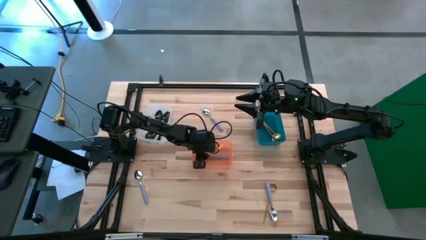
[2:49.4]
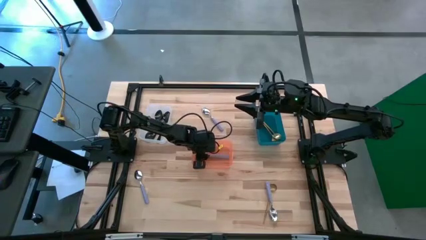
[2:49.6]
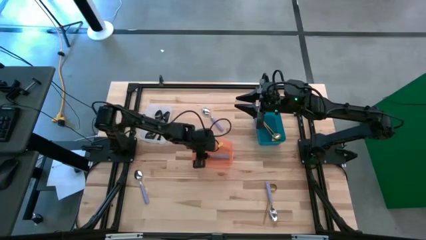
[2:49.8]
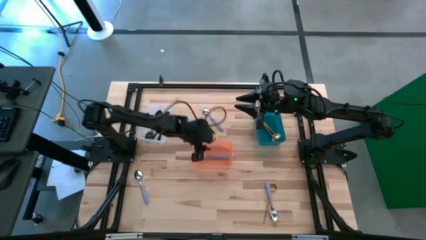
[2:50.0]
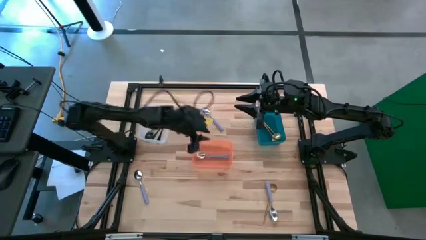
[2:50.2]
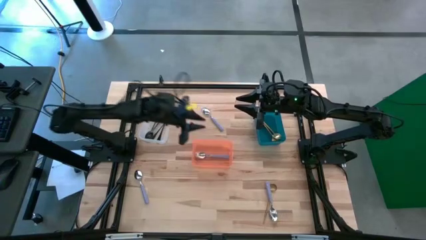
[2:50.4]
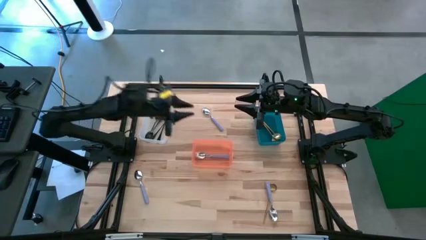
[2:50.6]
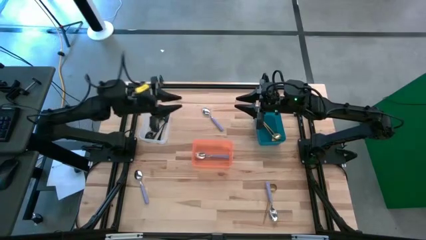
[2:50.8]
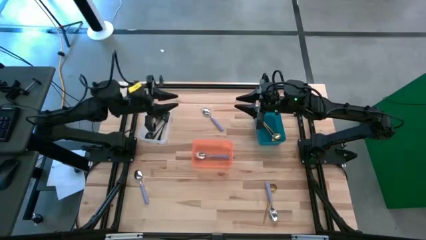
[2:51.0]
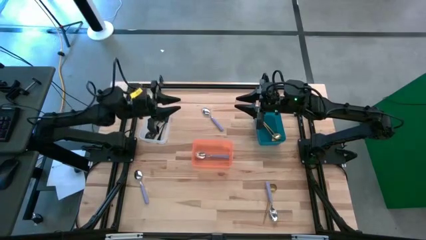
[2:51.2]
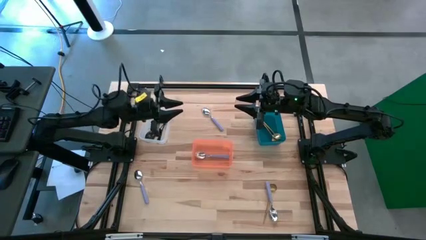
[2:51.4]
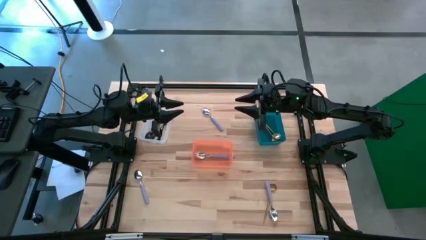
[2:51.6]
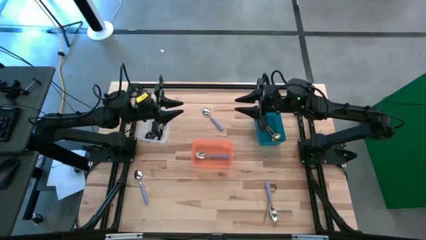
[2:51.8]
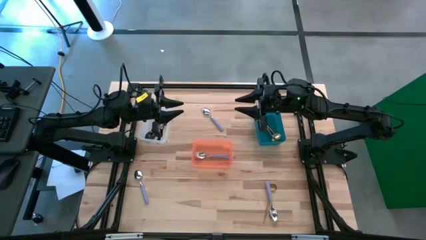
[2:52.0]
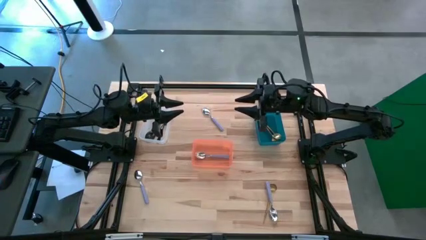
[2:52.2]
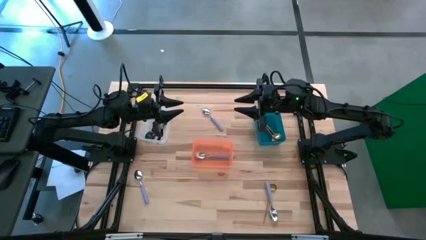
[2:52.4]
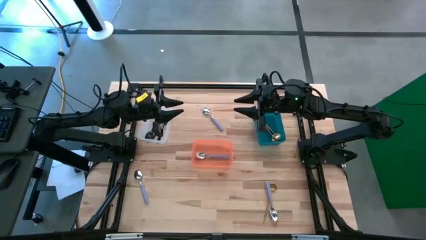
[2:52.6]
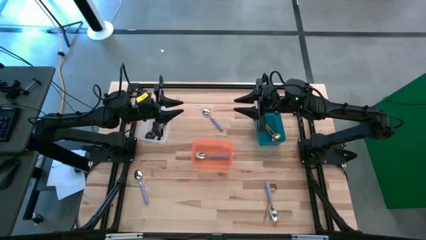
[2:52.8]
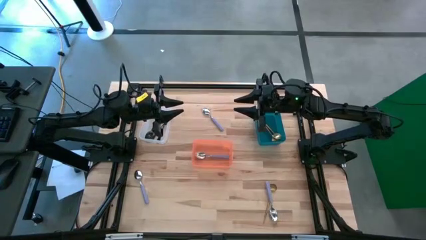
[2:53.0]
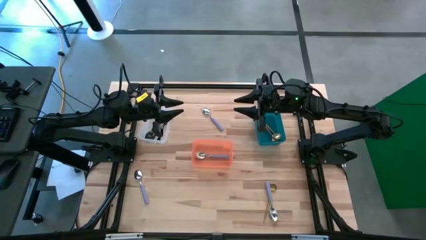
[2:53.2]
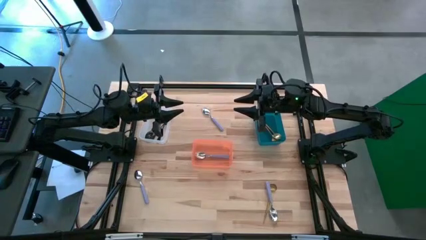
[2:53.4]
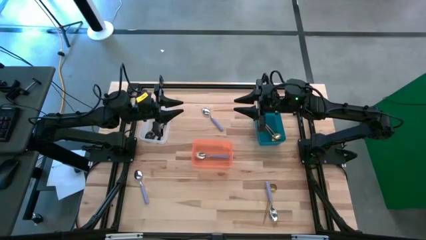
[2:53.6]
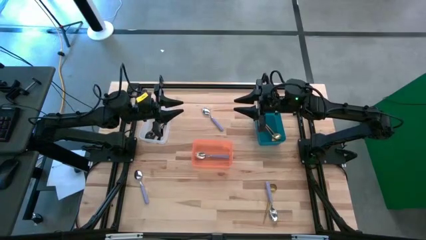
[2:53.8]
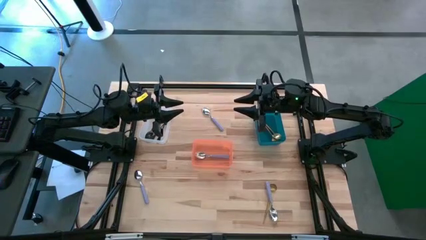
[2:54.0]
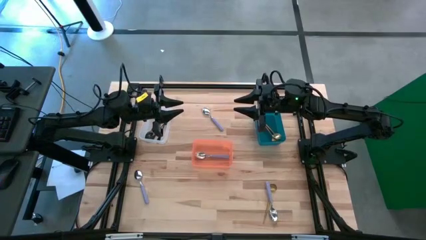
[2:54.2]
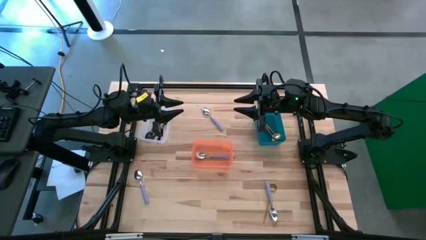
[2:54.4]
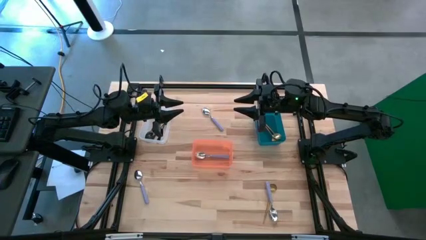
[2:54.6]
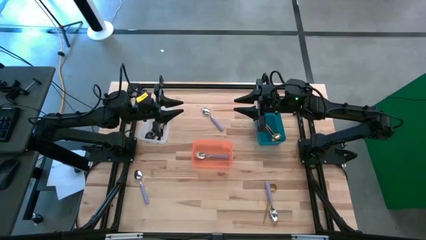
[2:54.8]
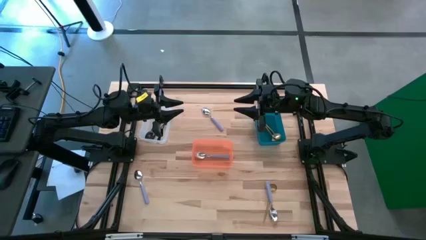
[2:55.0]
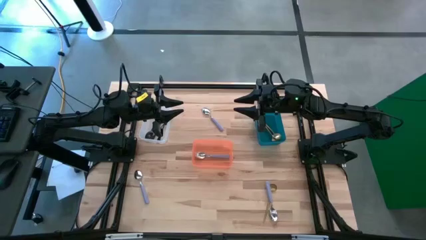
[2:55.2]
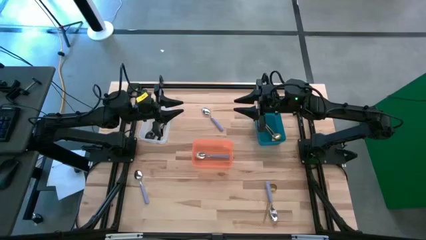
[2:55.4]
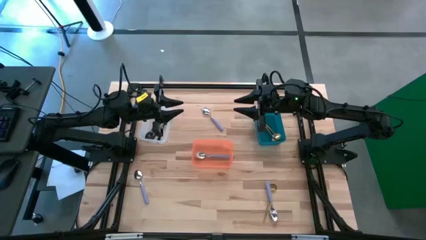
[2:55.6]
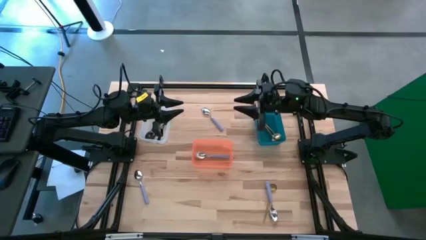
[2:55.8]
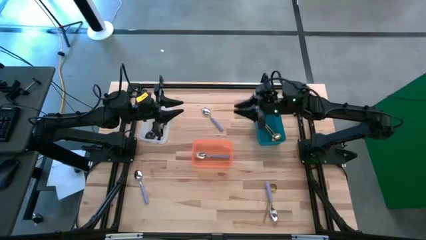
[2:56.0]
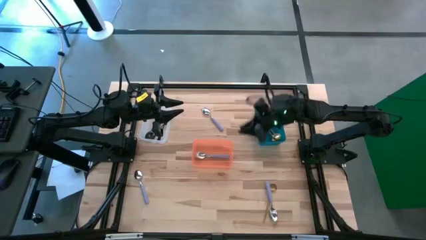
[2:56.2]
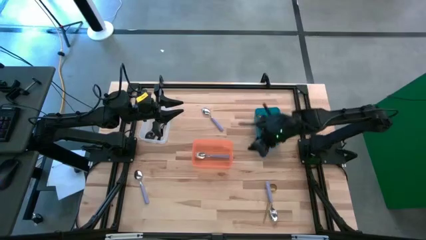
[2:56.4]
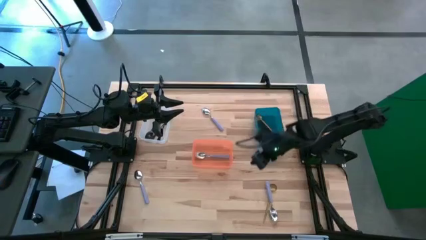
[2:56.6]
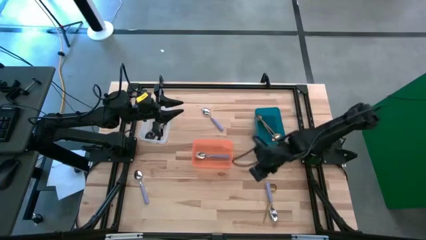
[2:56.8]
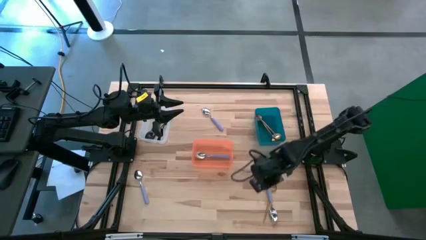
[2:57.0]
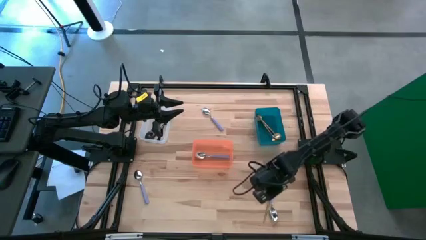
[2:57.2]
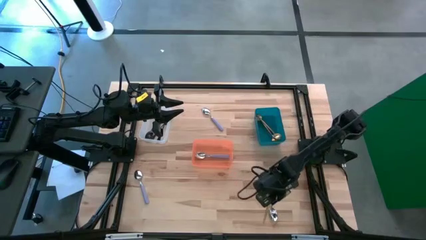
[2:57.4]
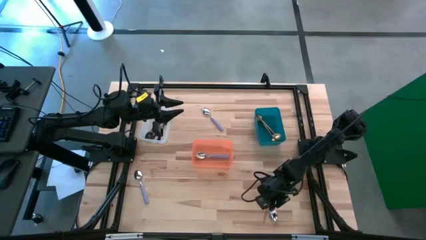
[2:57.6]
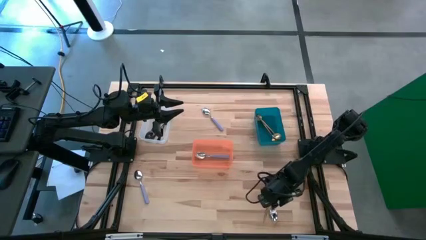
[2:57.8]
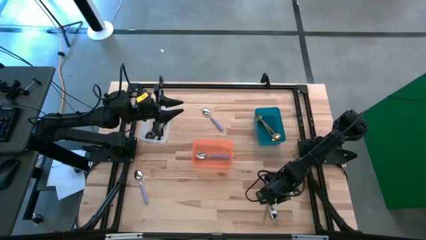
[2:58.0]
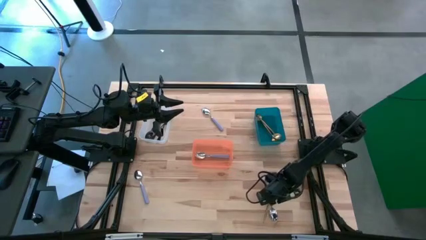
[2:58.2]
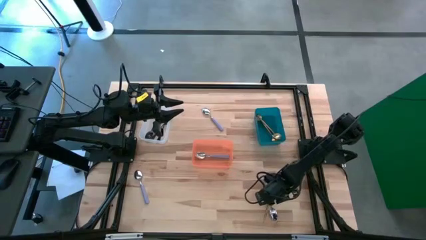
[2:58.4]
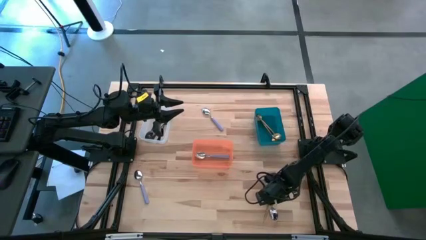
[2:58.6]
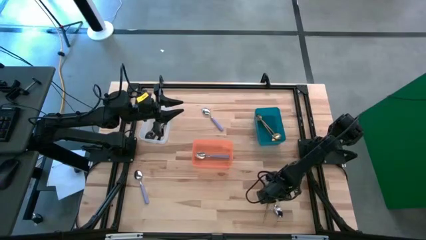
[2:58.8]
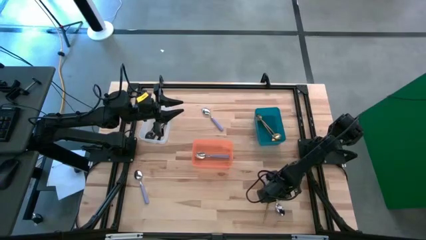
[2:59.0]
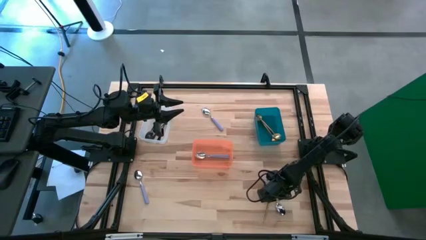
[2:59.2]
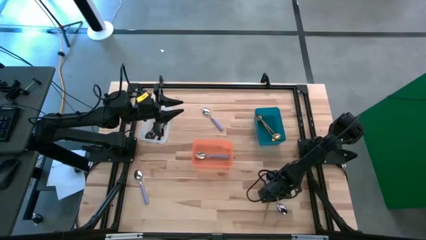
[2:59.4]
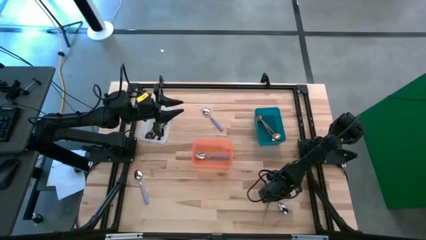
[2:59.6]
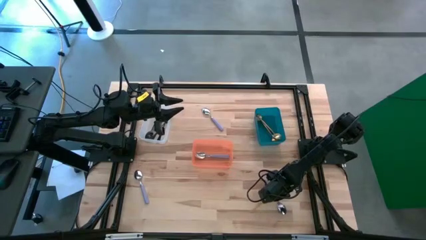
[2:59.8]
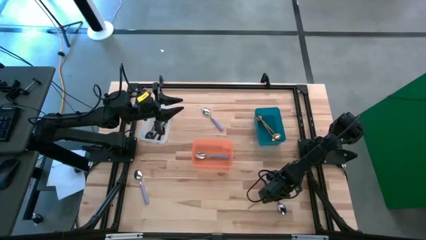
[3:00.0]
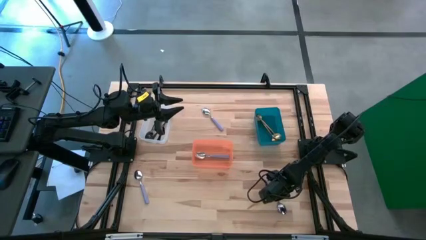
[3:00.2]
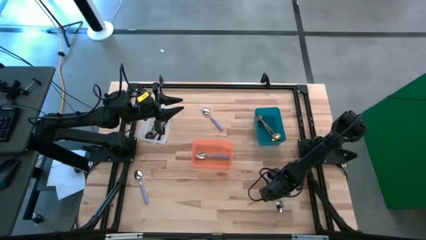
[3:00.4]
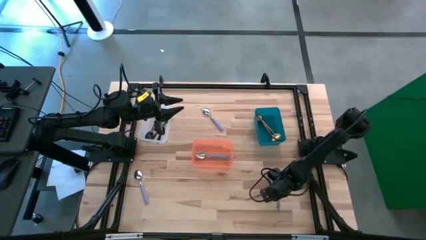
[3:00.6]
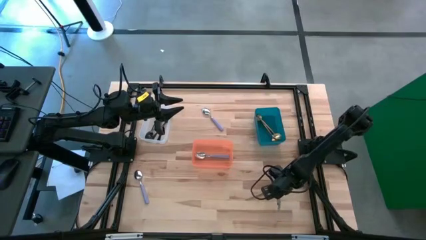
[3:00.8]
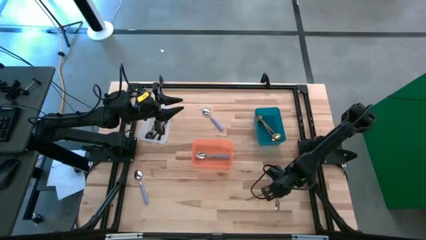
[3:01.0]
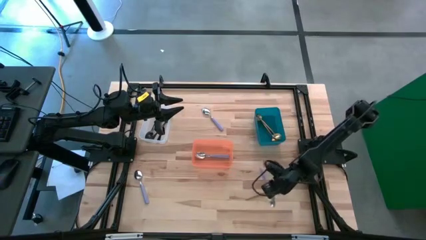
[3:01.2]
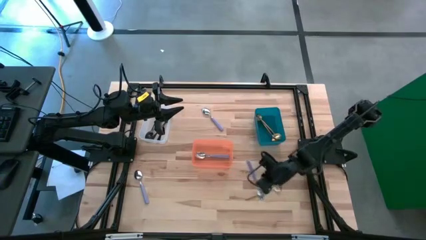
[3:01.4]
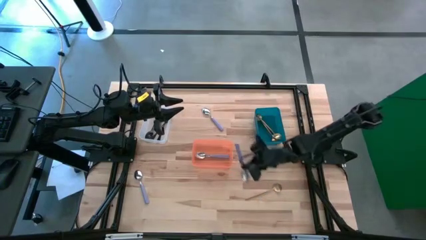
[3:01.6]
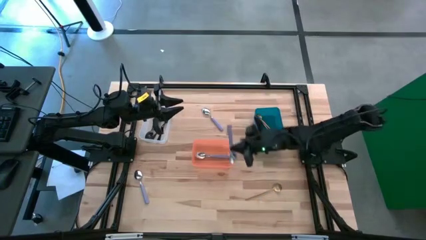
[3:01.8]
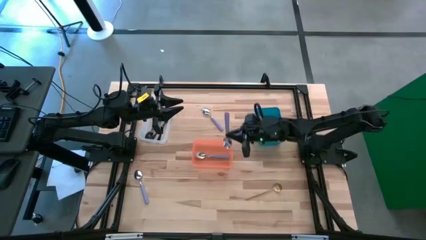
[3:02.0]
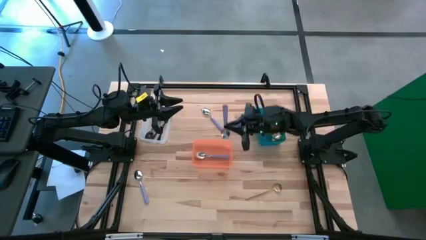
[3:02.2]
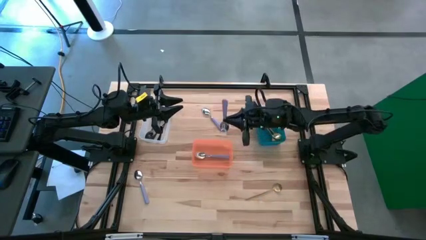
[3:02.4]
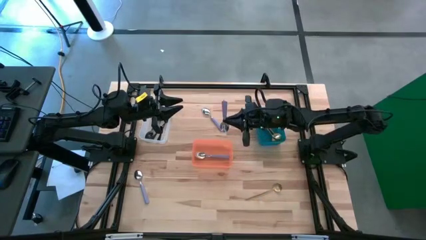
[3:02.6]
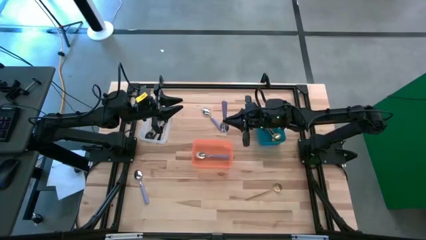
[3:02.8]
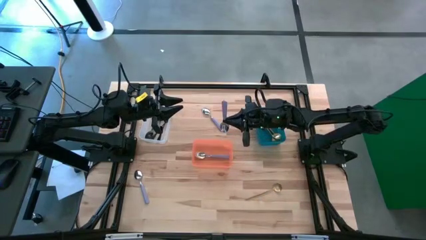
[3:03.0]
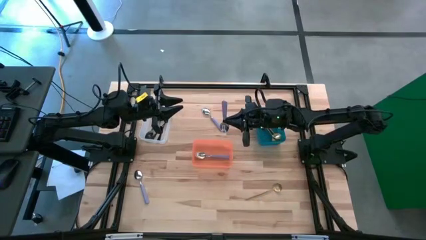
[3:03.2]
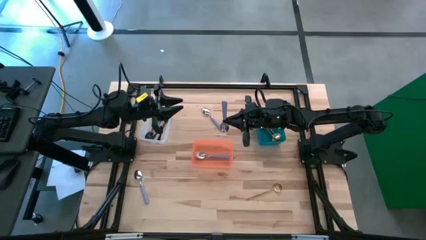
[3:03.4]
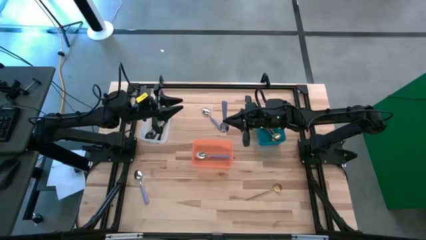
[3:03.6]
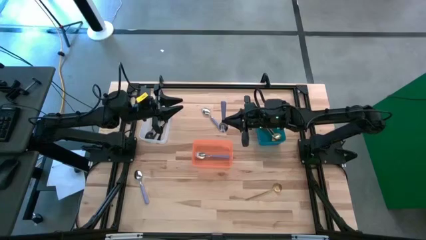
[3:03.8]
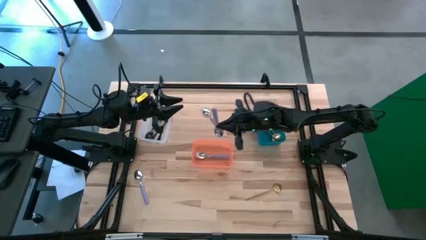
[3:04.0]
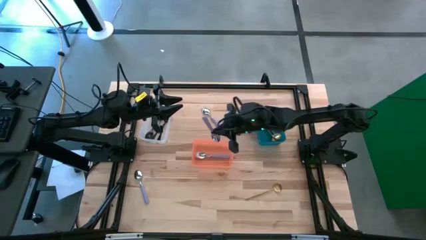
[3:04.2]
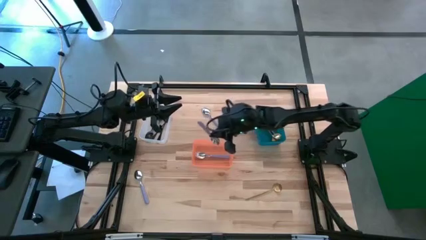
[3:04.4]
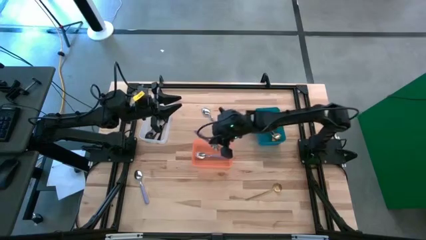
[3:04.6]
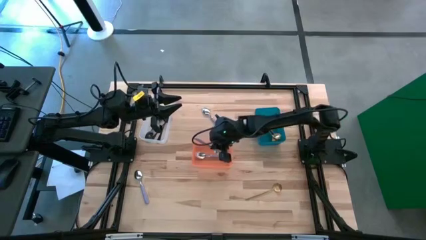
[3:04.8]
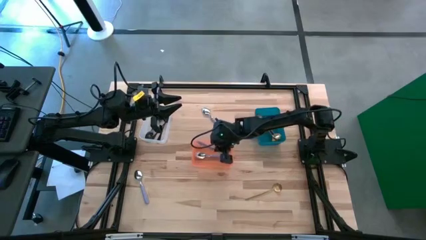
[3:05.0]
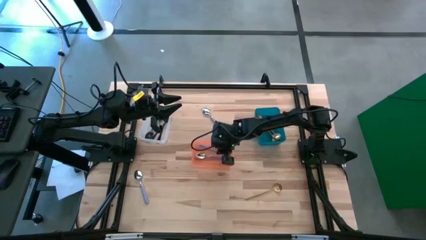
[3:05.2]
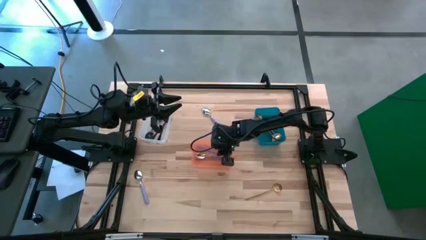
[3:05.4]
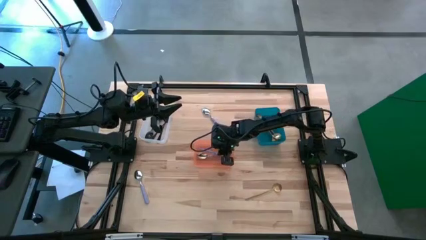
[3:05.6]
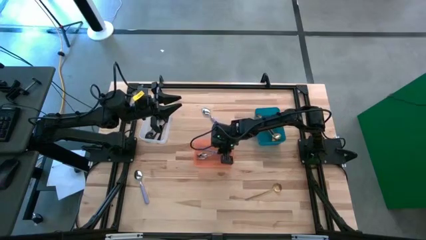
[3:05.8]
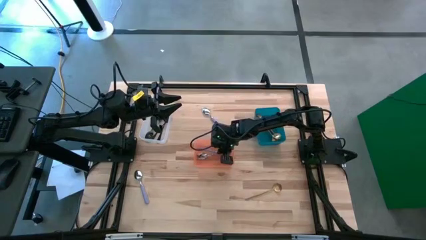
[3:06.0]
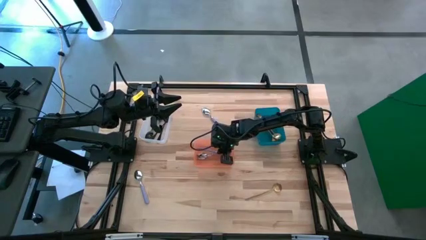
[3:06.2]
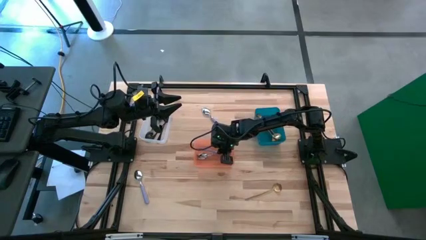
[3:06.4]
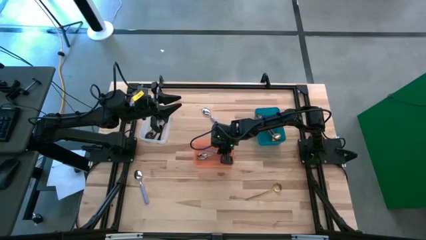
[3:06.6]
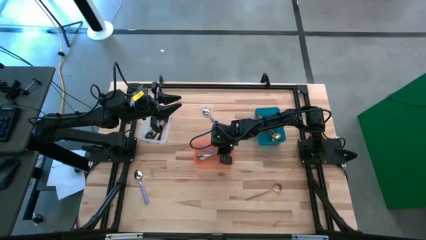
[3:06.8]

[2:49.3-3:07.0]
Task: Sort silverware by color (type)
Put the bottom right violet spoon into the orange bin
